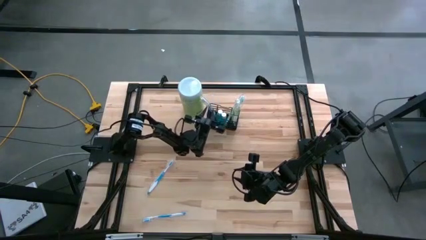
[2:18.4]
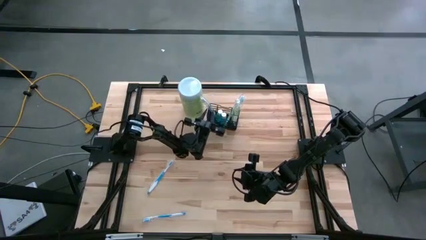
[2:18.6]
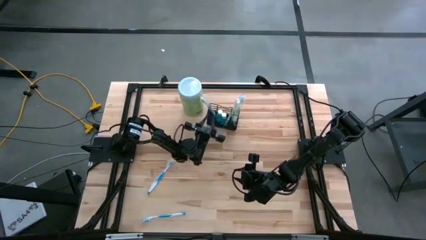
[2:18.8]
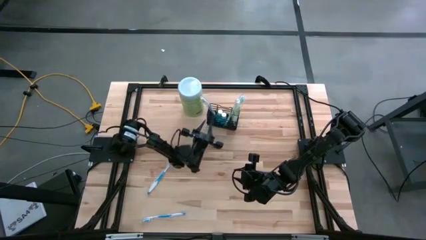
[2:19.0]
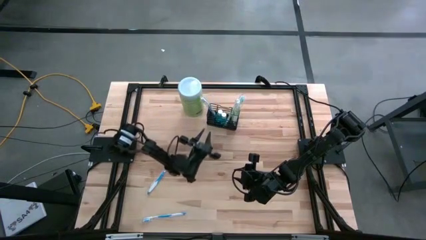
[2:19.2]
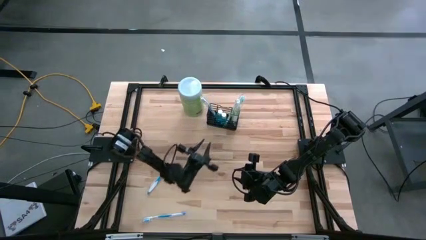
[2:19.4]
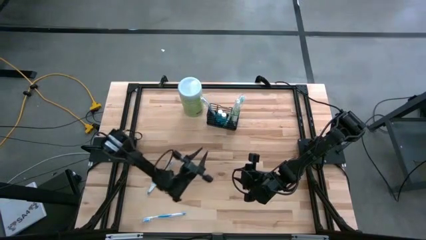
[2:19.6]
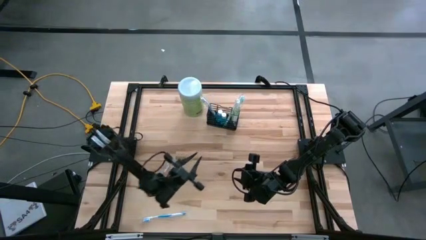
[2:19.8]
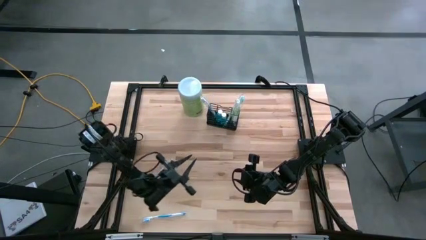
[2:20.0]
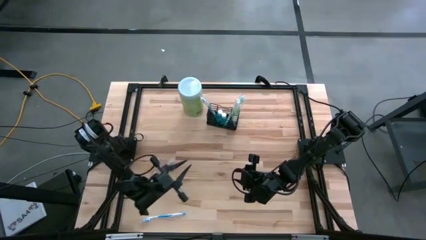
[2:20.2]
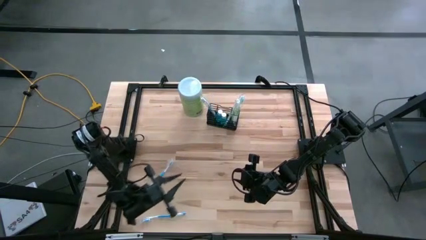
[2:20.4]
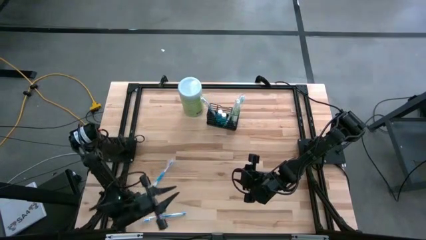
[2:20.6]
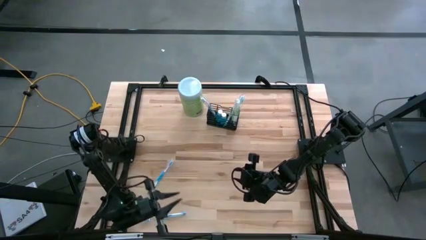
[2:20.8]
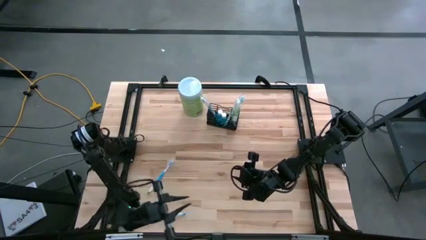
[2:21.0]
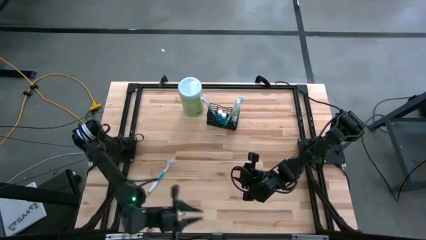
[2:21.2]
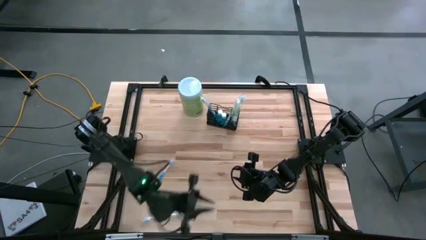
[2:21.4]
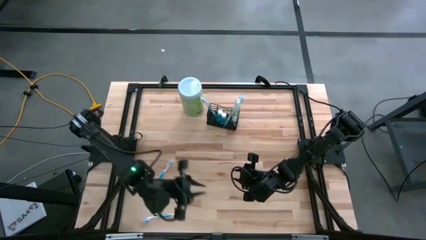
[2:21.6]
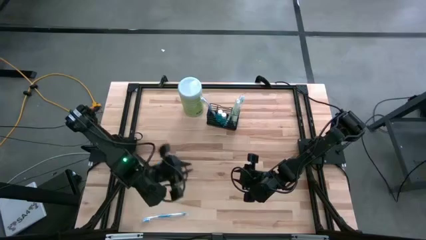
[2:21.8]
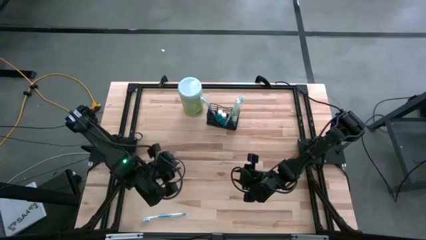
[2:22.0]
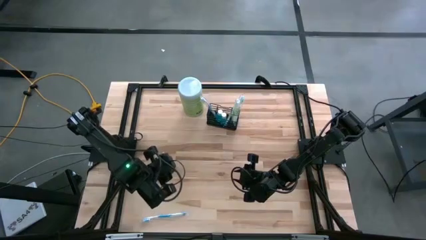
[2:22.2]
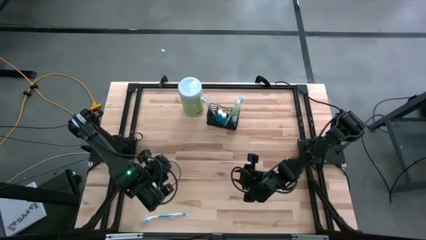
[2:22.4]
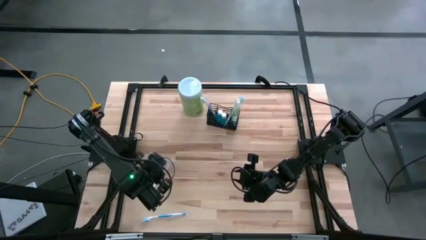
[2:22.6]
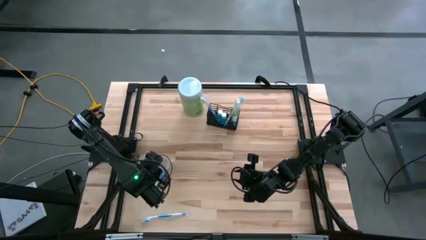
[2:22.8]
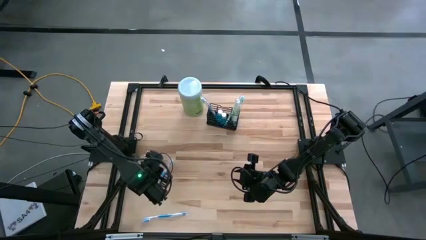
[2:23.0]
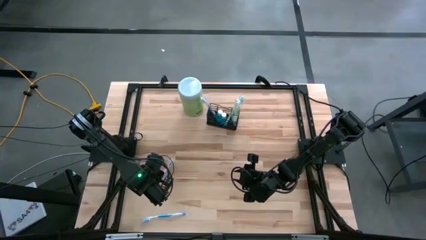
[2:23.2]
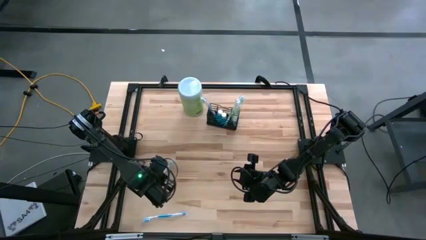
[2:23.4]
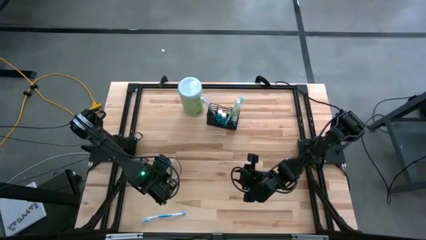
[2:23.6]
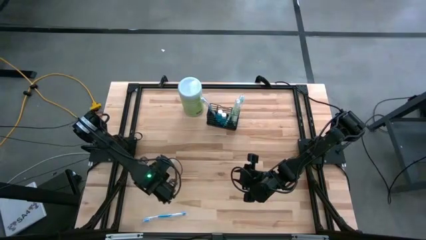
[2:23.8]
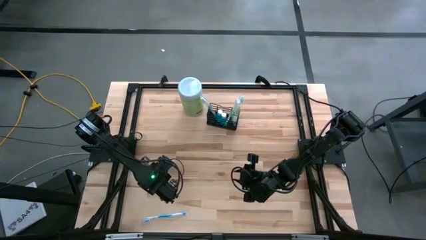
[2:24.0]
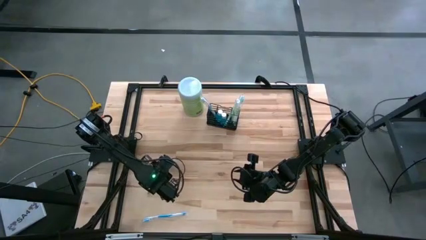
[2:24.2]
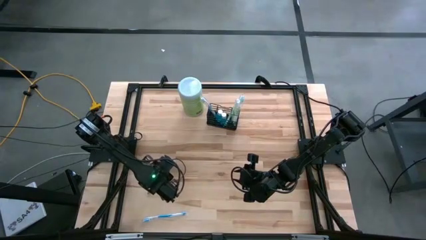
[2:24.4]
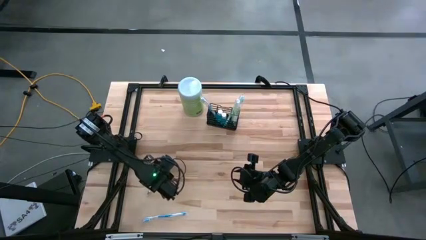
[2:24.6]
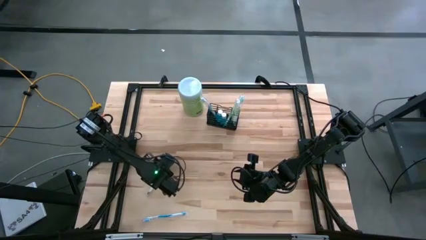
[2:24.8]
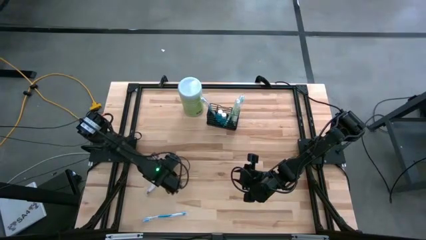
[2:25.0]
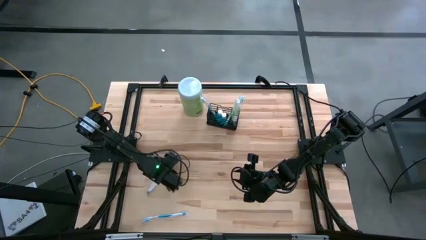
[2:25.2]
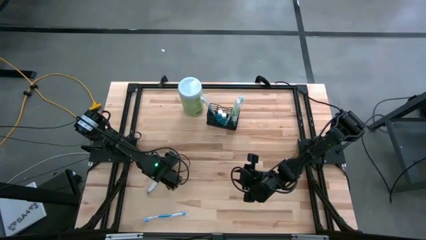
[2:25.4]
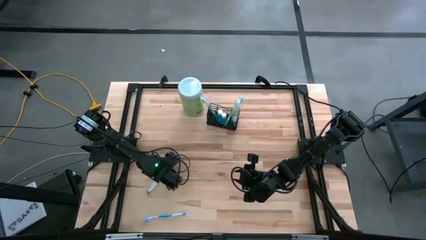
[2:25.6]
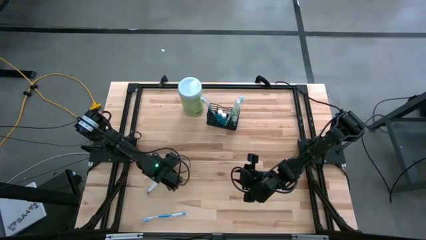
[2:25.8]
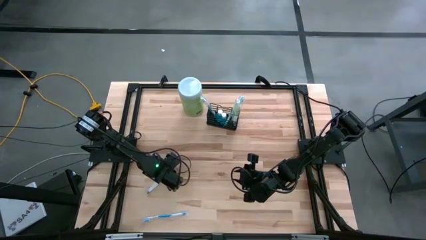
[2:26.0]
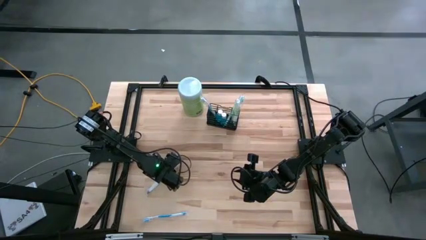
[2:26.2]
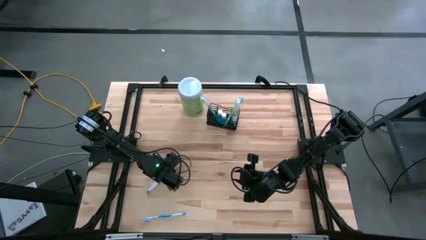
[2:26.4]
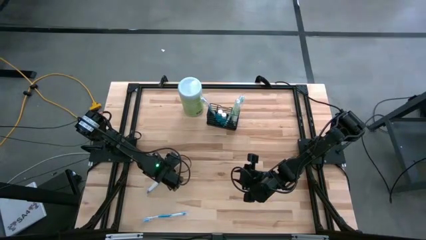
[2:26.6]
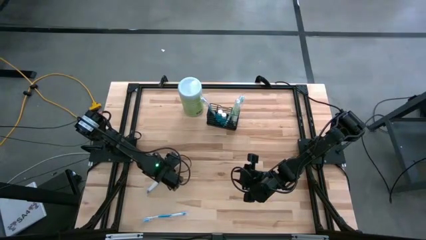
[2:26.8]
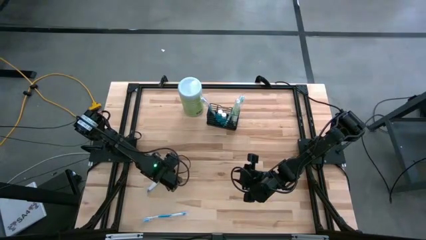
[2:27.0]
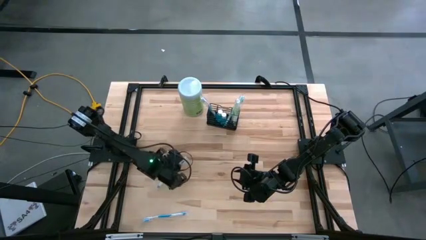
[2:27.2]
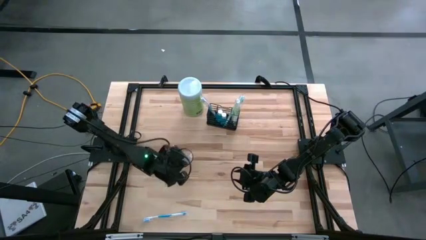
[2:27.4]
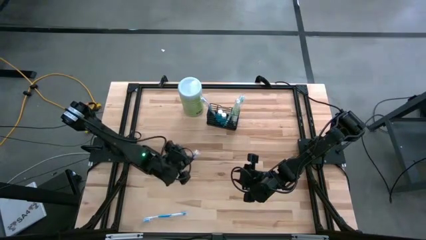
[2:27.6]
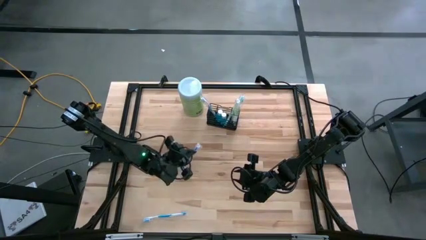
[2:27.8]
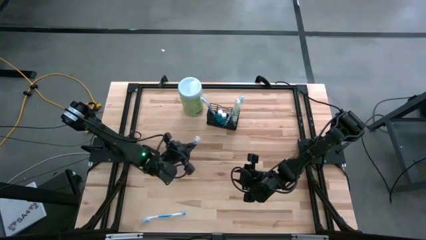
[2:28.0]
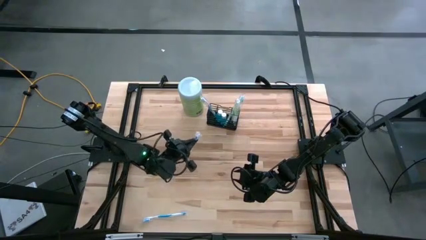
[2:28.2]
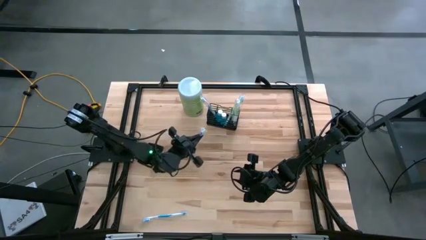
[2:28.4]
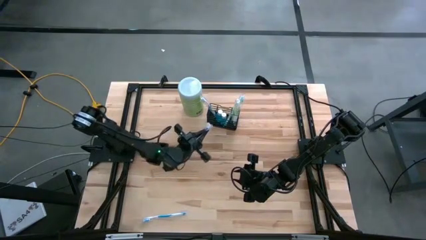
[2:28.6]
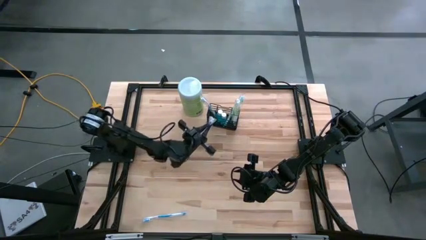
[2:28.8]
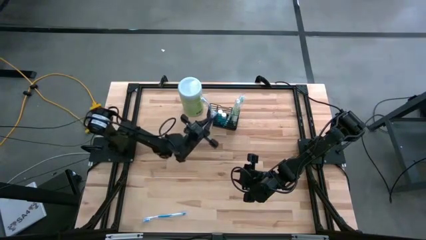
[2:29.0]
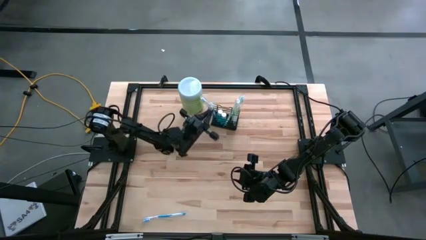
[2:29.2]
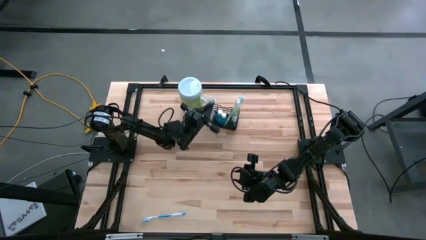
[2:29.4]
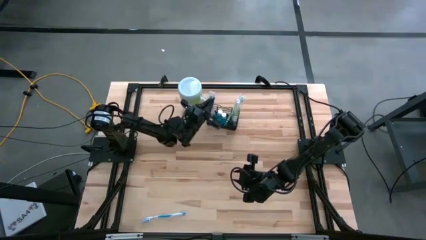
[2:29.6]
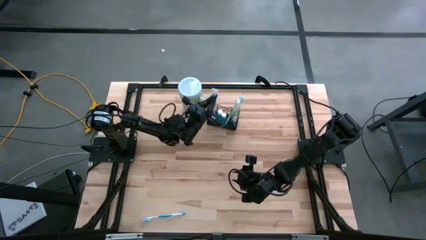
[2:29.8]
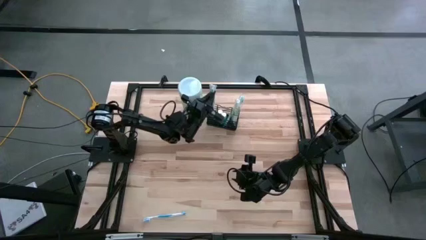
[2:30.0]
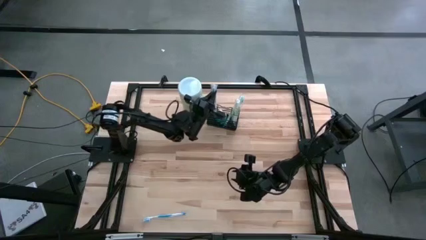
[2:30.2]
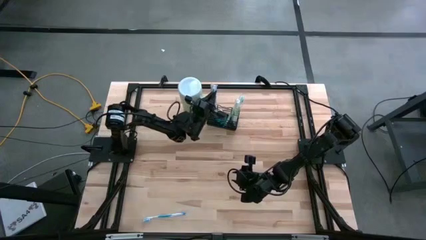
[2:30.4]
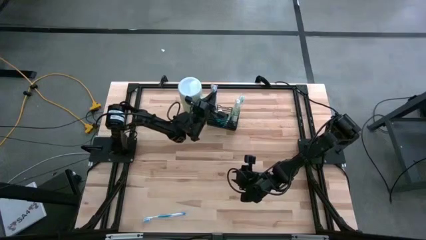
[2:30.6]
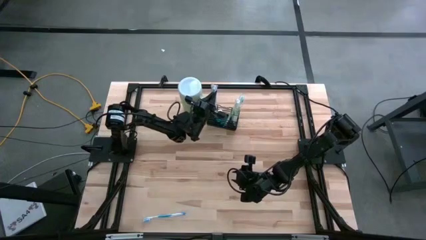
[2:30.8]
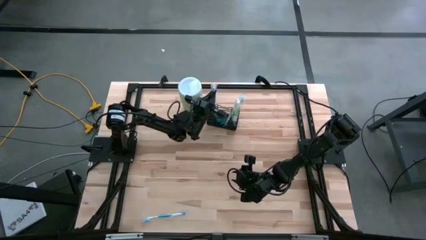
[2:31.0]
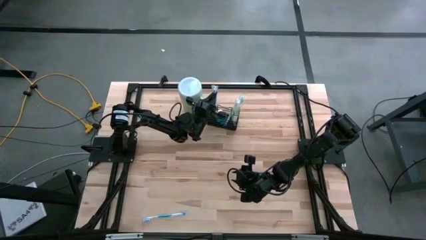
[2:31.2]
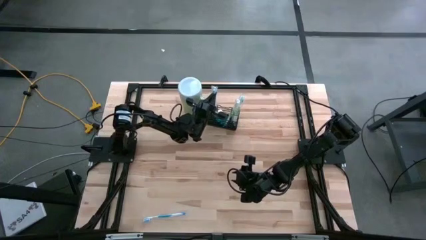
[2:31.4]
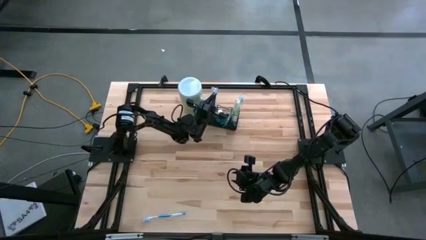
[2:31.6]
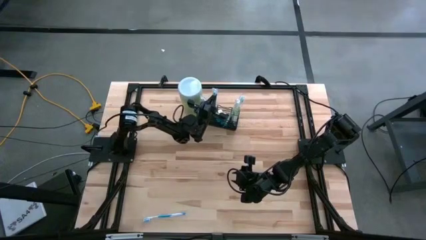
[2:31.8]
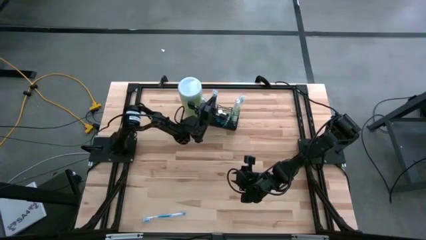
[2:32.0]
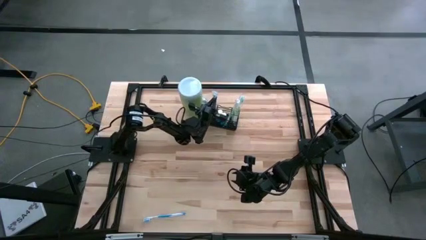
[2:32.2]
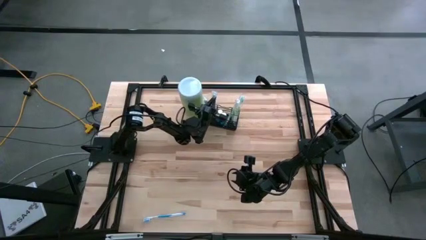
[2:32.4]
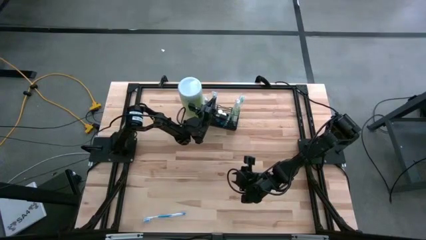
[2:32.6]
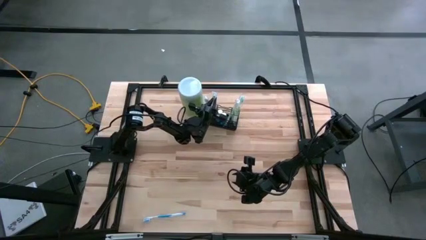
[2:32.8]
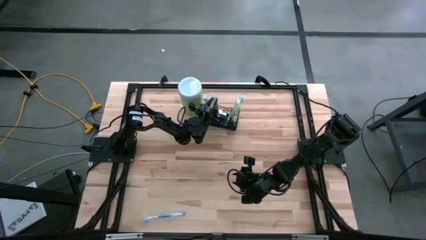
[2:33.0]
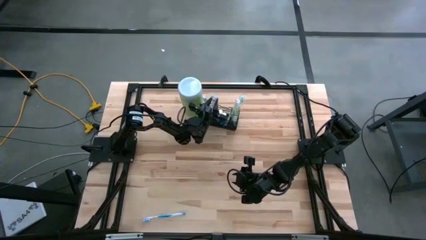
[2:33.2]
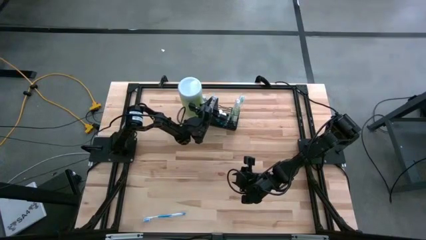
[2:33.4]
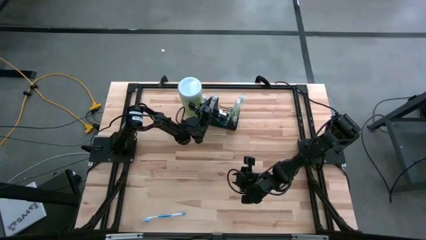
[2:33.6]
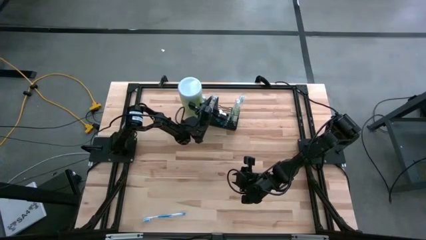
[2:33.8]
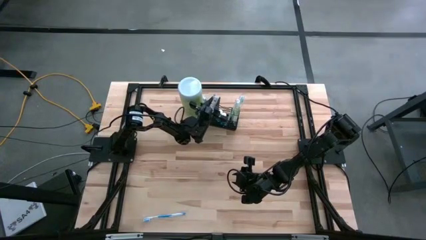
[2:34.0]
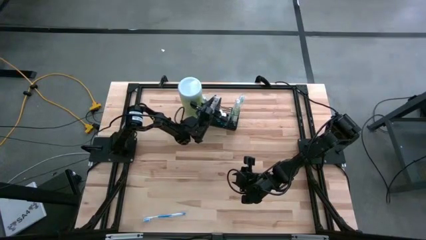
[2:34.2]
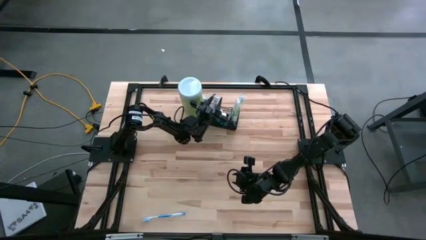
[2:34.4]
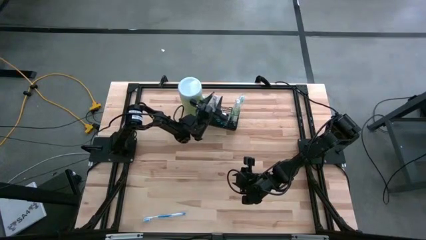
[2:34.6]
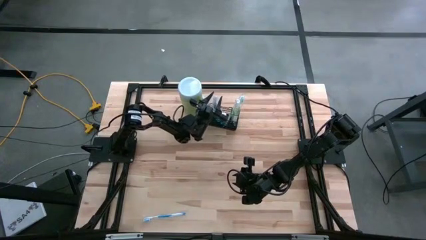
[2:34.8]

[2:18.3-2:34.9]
Task: Pick & Place toothbrushing station
Put the top blue toothbrush into the mesh organizer
